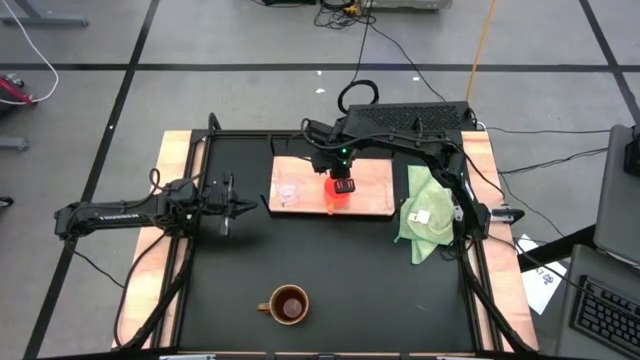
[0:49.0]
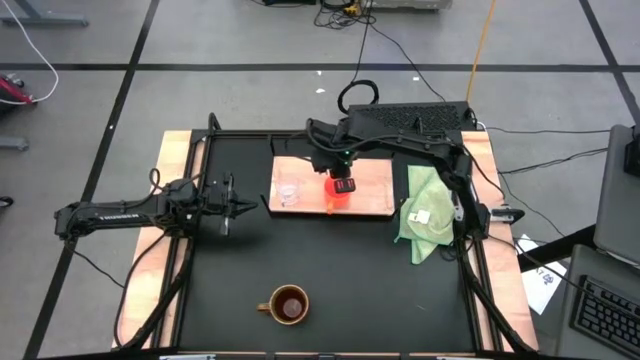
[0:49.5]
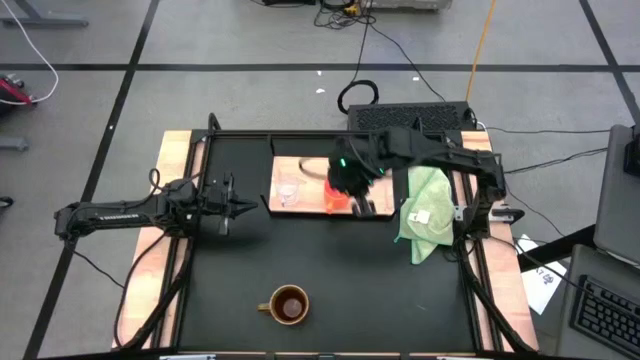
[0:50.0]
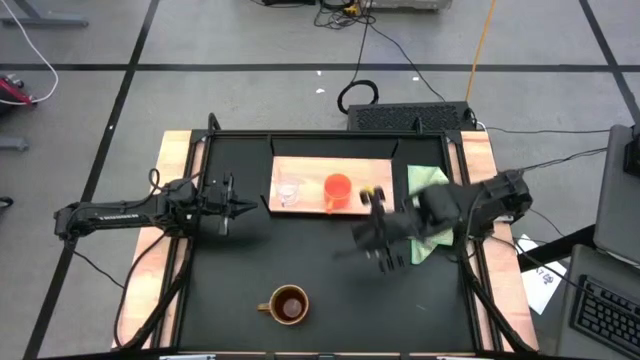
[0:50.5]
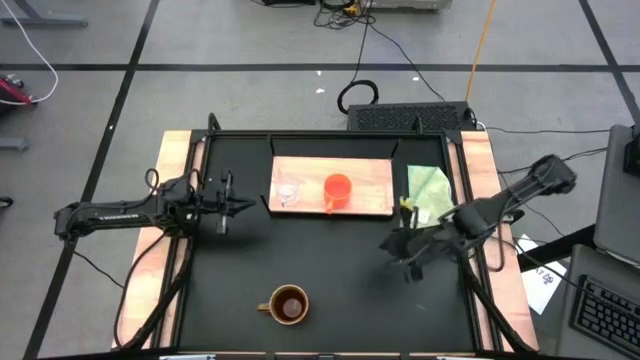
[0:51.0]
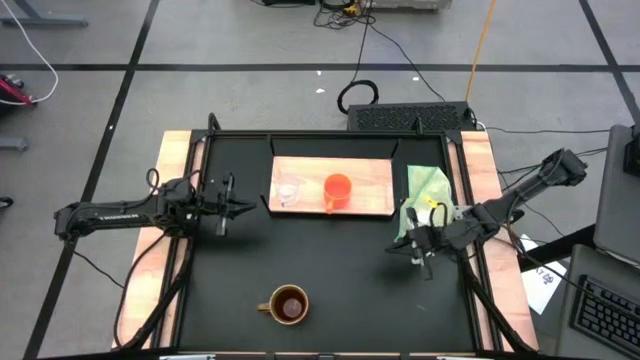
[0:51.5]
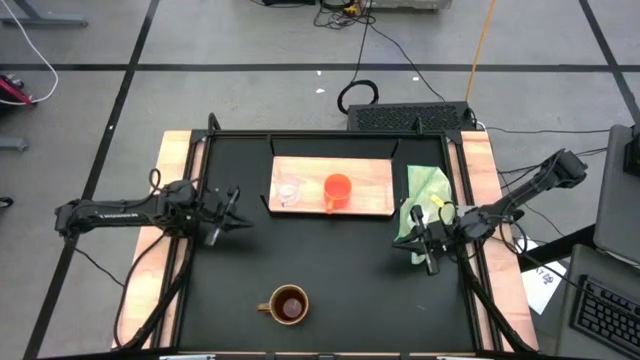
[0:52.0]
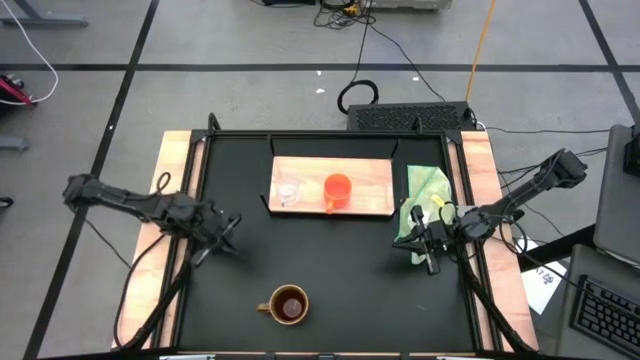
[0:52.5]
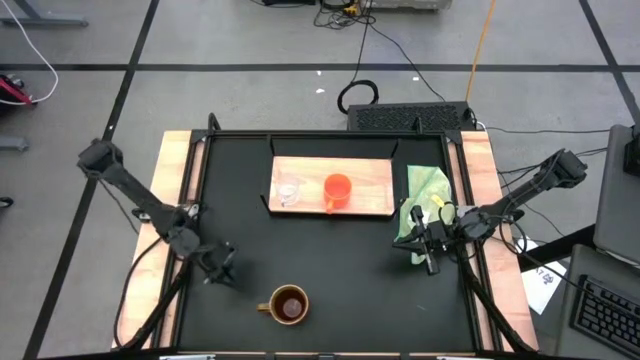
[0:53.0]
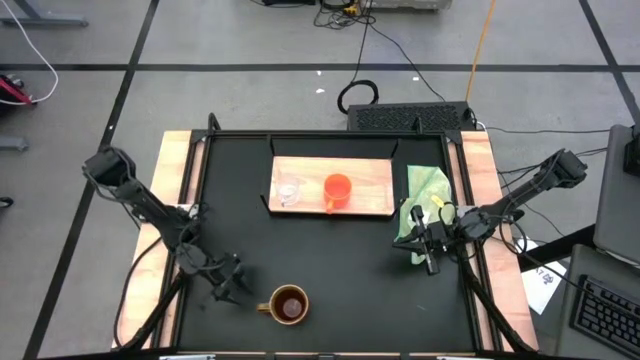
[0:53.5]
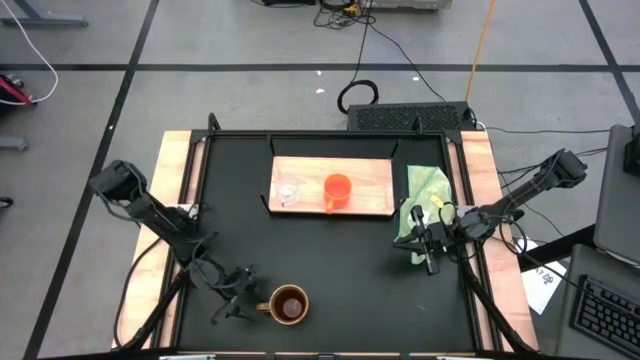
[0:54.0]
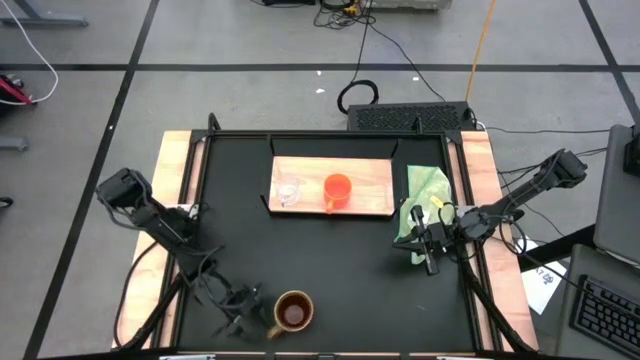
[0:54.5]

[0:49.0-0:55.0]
Task: Stack small to large cups/mugs on shelf
Put the brown mug on the shelf

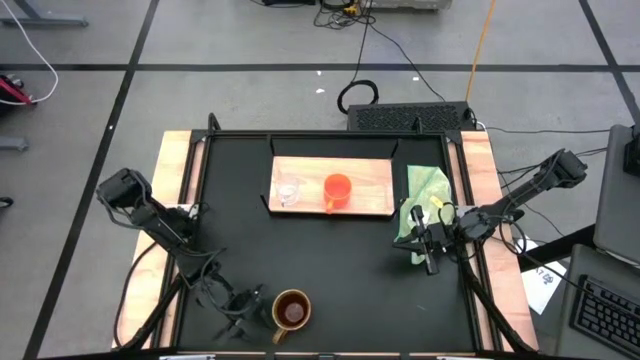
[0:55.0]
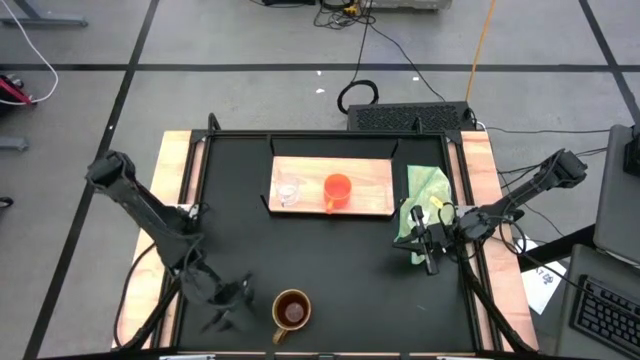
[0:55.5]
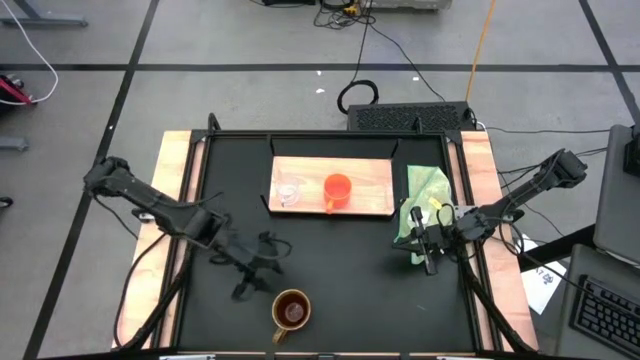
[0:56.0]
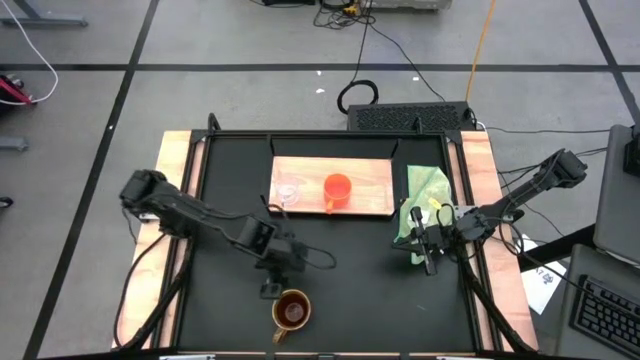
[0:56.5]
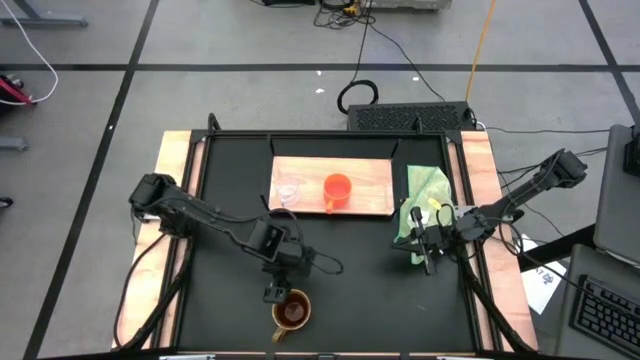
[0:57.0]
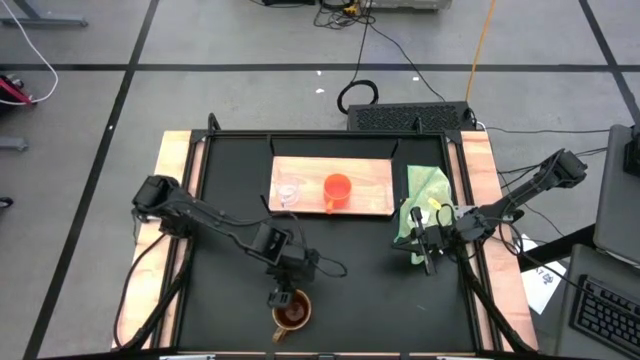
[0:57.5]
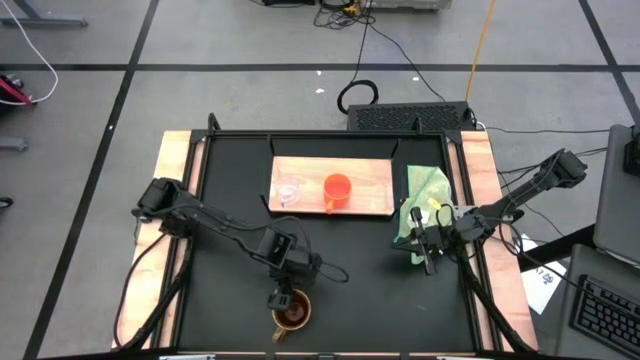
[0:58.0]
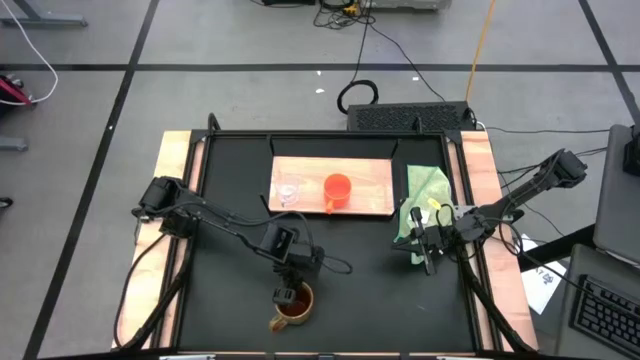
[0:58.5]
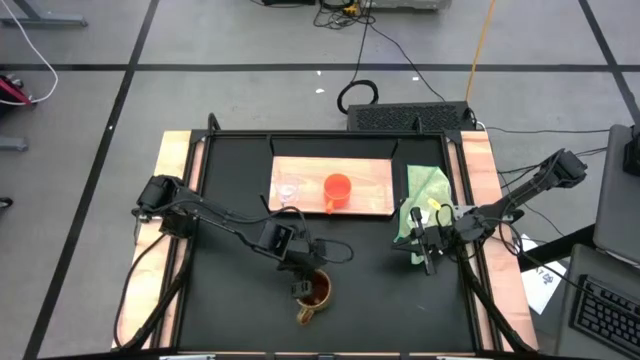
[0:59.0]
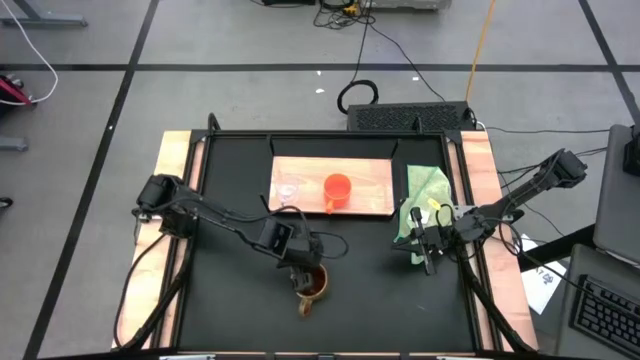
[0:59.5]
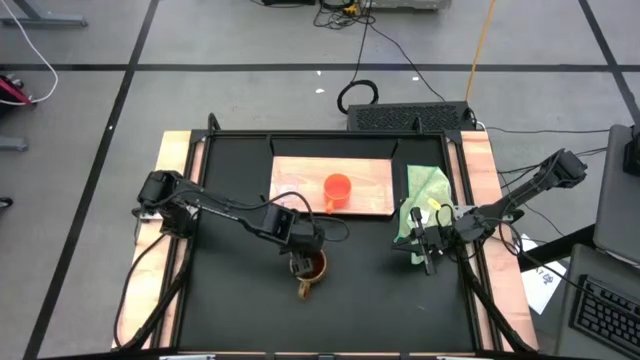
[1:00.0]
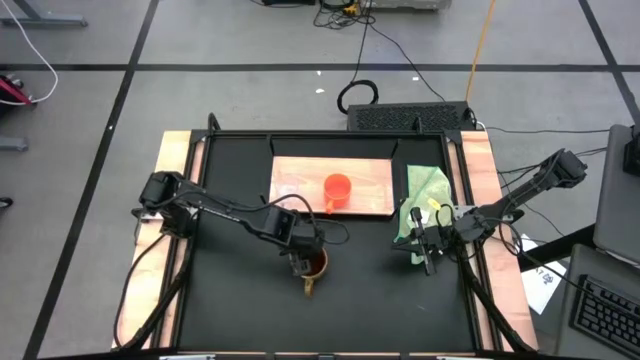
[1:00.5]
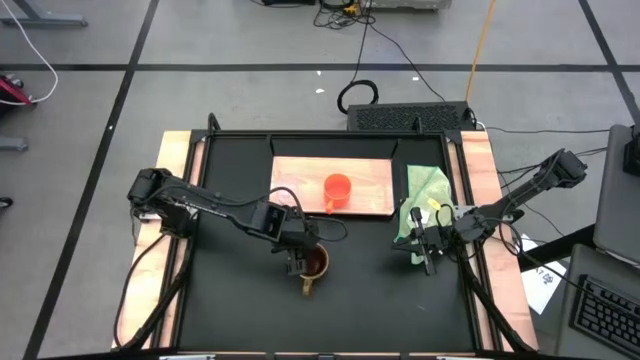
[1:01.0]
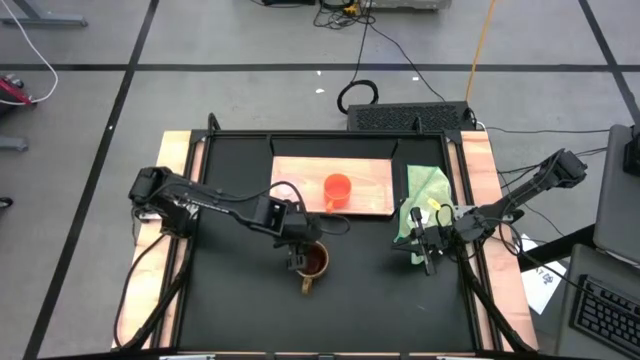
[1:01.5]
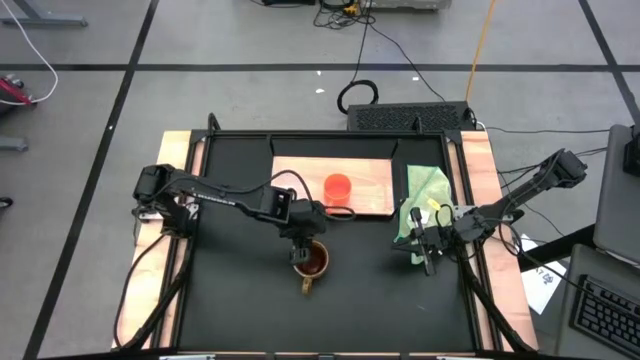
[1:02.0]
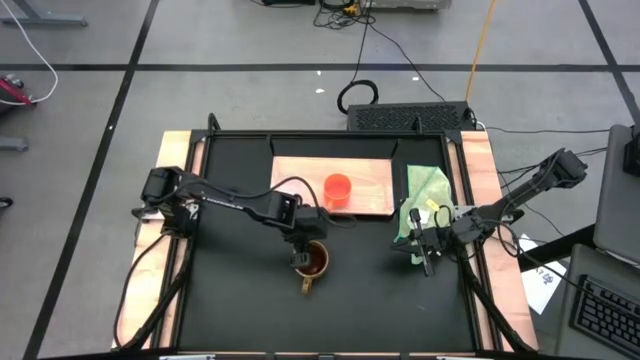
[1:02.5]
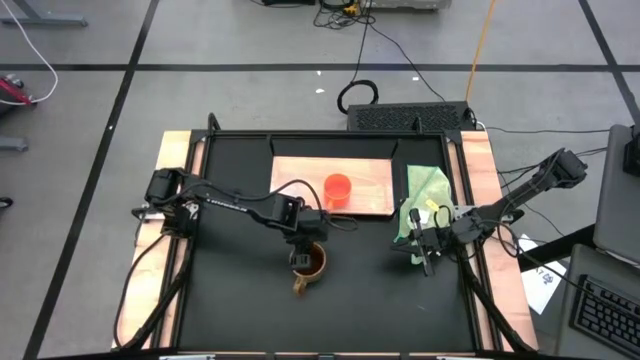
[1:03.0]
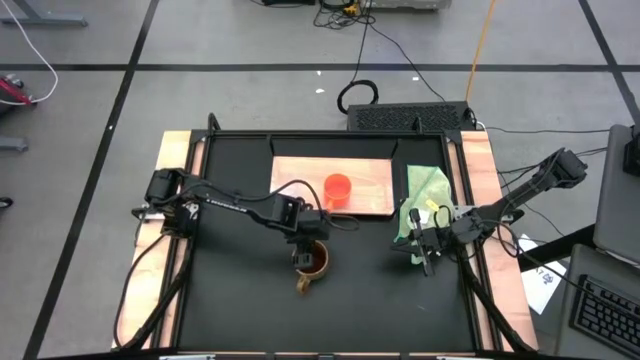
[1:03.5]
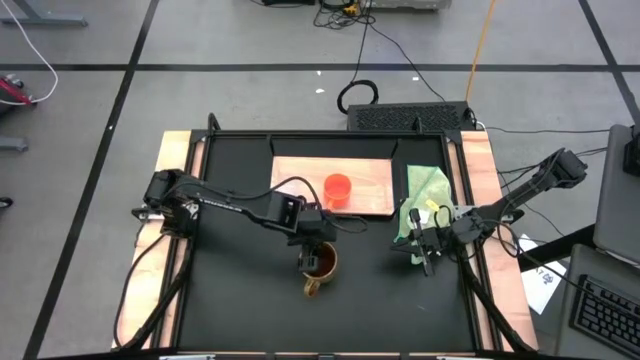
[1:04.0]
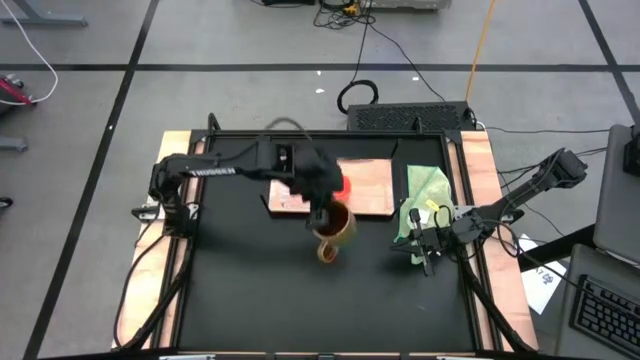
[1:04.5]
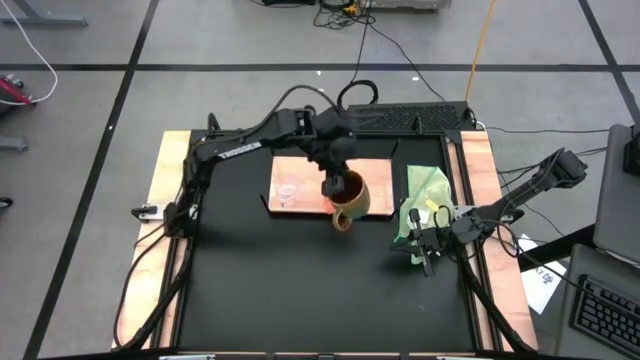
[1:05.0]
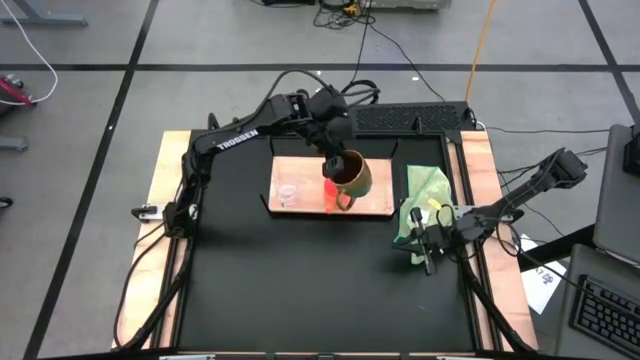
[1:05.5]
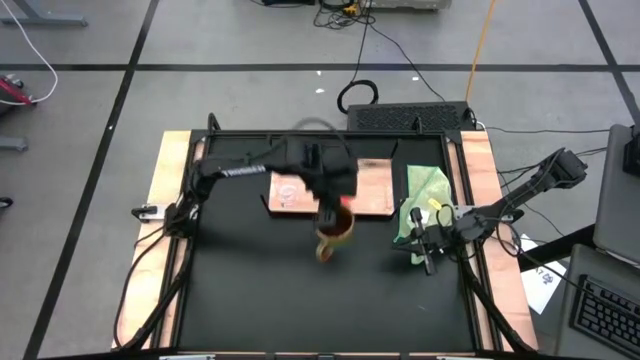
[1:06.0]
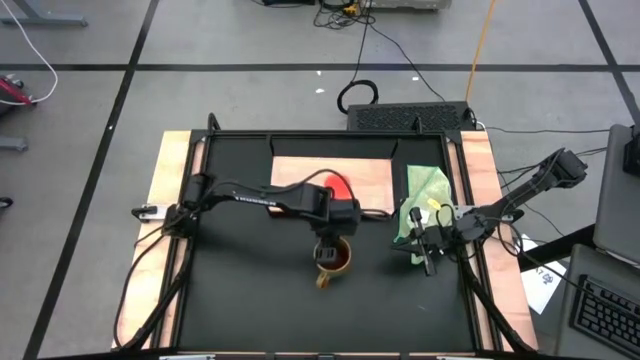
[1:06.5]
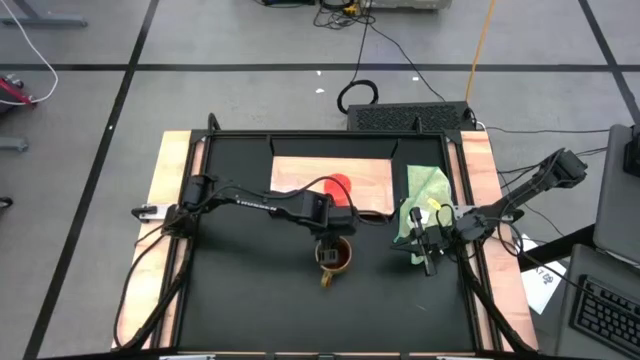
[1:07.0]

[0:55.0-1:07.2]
Put the brown mug on the shelf

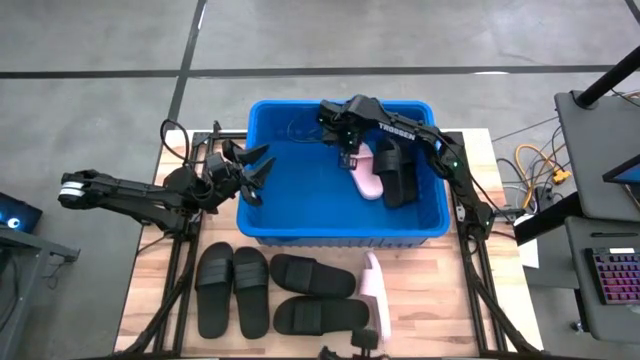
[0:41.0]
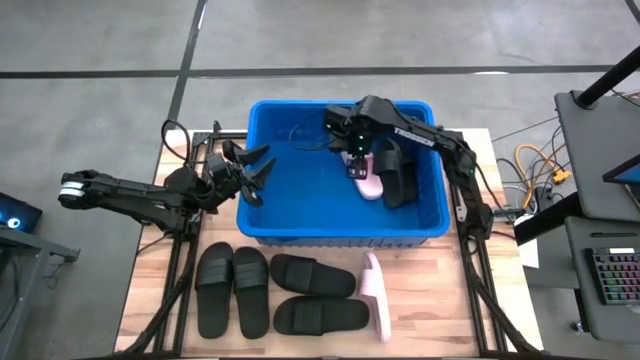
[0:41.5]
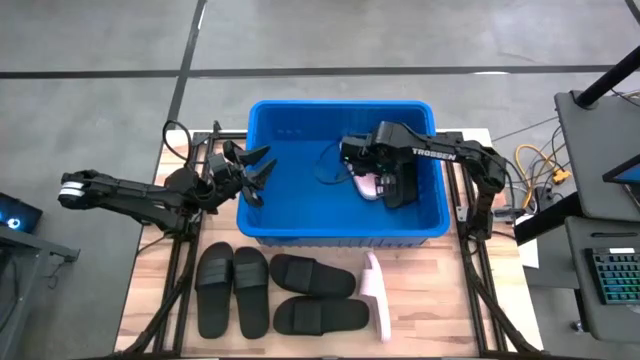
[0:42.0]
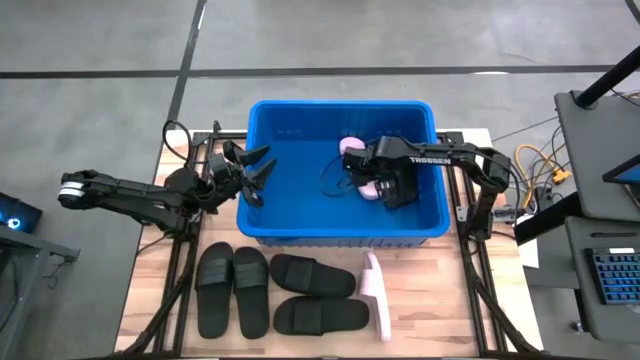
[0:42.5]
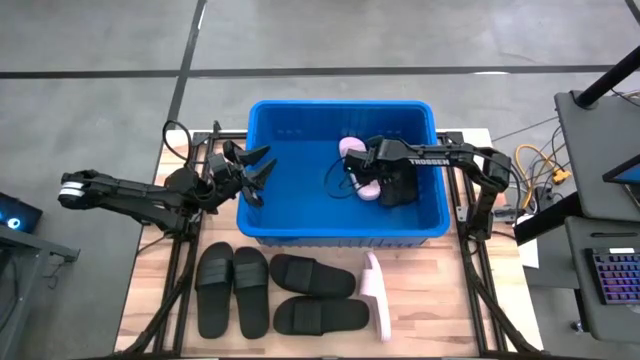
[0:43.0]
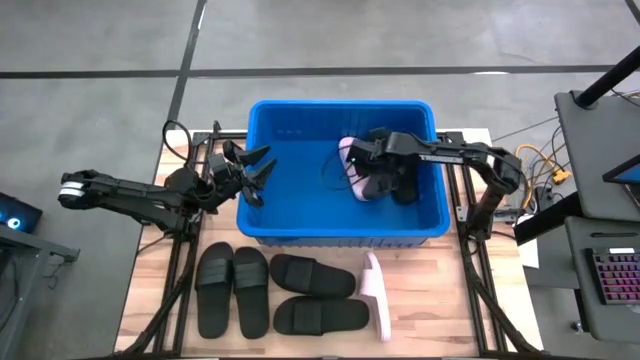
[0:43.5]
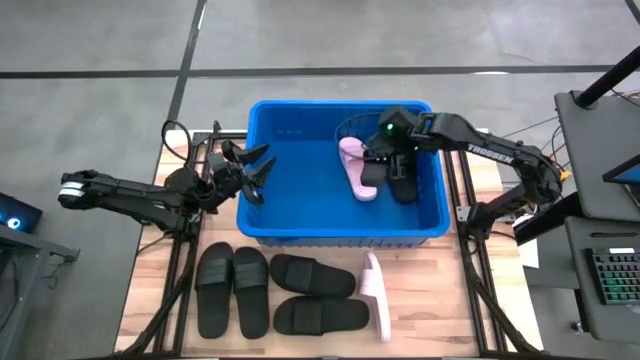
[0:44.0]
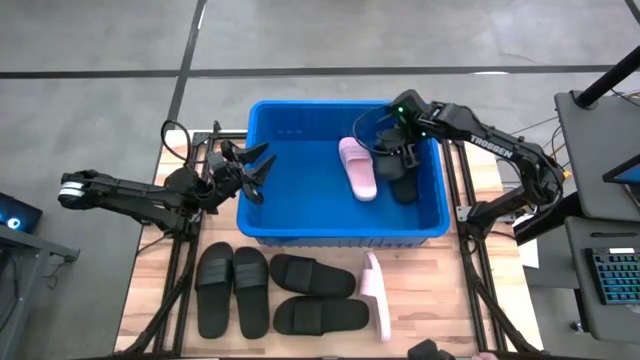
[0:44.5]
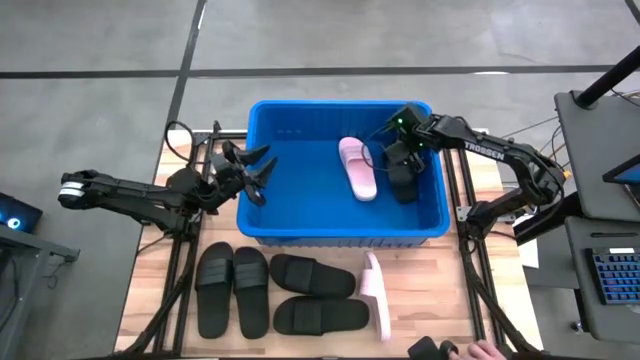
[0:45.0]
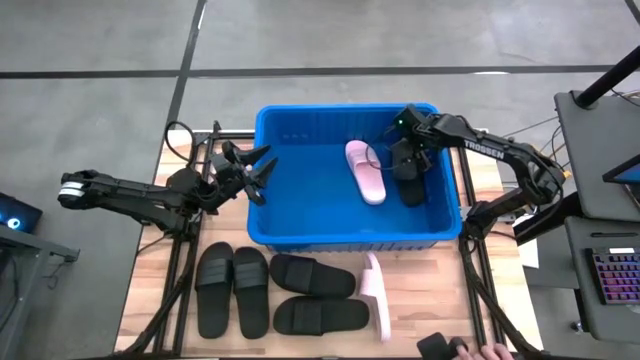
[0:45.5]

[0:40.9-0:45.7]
Task: Pick and place slides into bin
Adjust the black slide in the blue container
